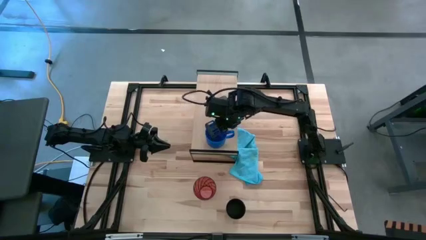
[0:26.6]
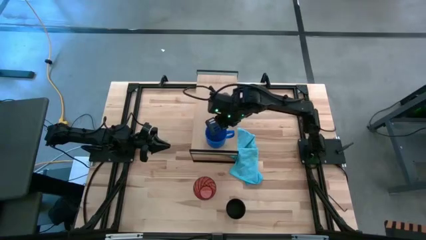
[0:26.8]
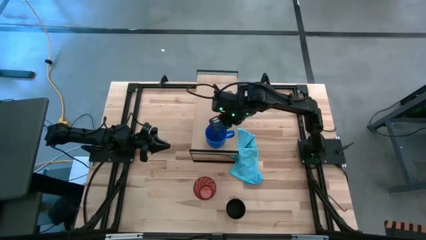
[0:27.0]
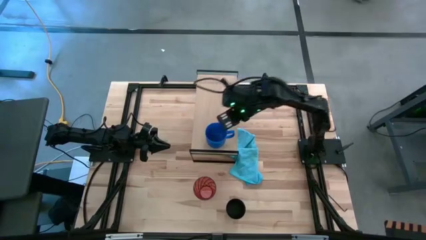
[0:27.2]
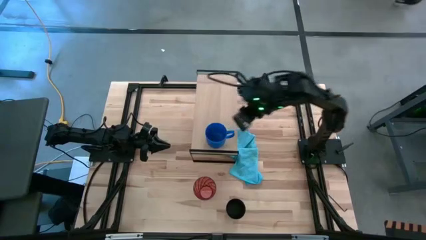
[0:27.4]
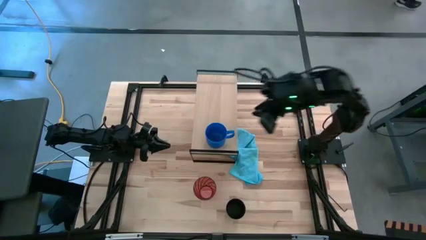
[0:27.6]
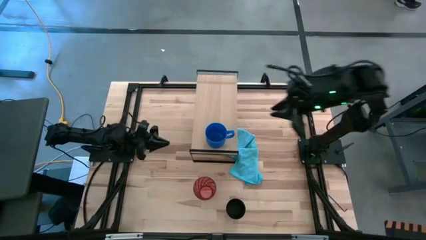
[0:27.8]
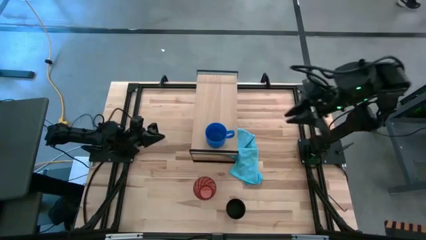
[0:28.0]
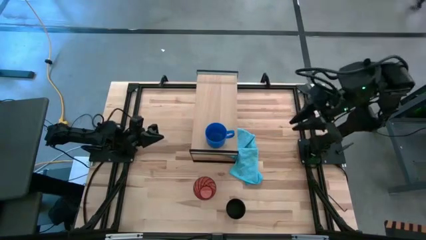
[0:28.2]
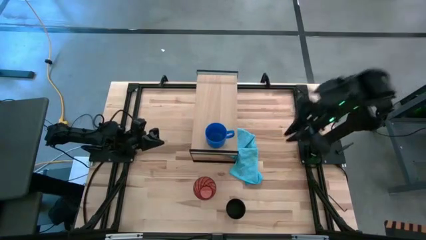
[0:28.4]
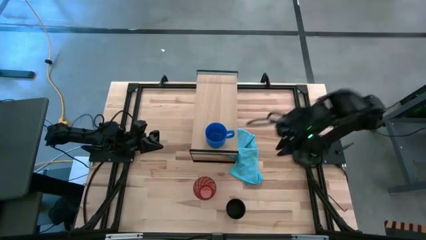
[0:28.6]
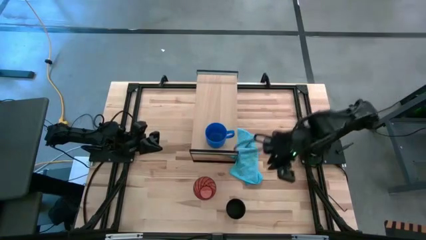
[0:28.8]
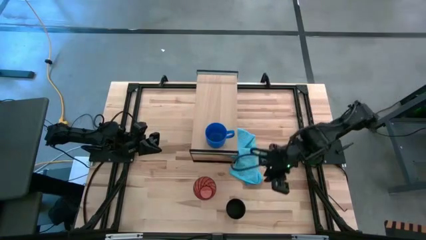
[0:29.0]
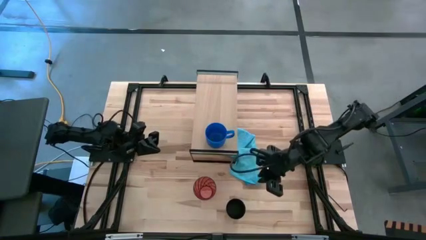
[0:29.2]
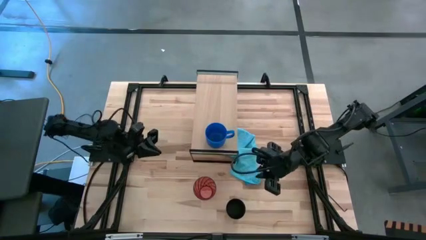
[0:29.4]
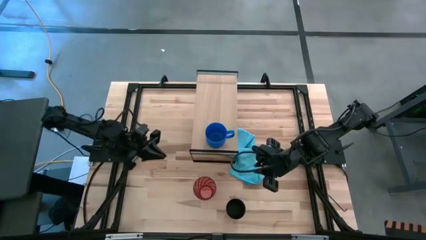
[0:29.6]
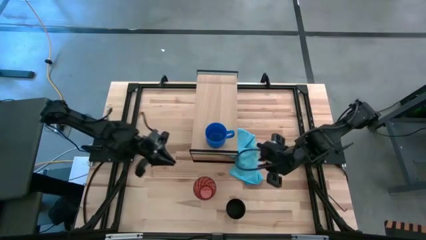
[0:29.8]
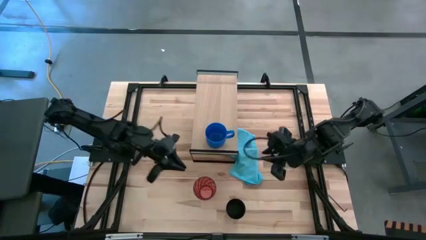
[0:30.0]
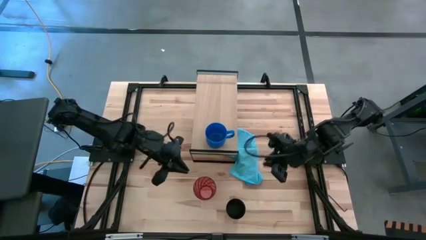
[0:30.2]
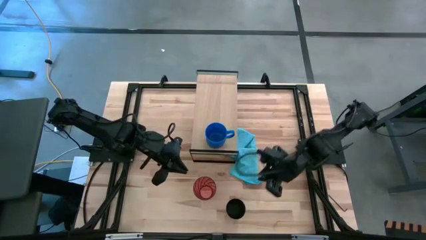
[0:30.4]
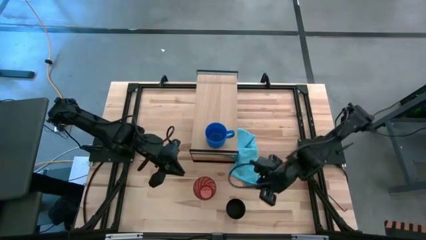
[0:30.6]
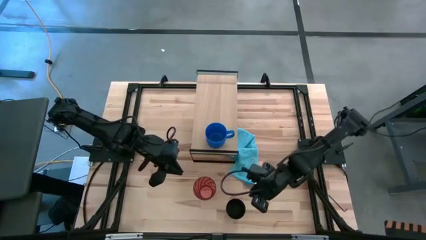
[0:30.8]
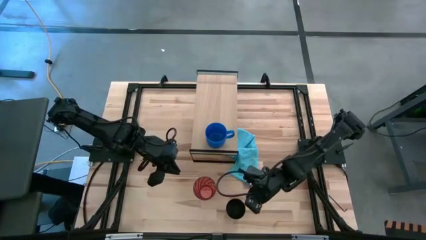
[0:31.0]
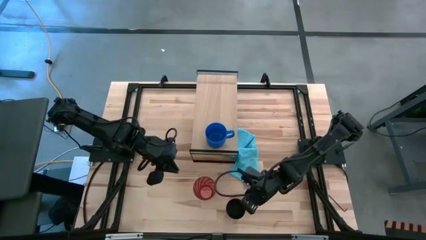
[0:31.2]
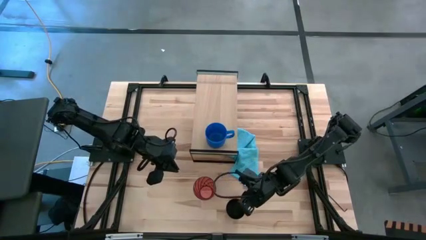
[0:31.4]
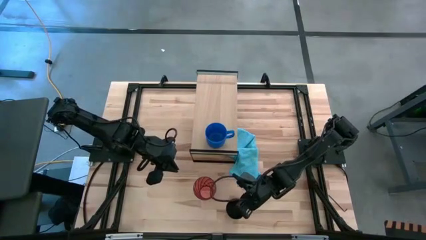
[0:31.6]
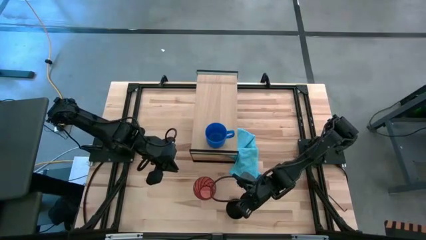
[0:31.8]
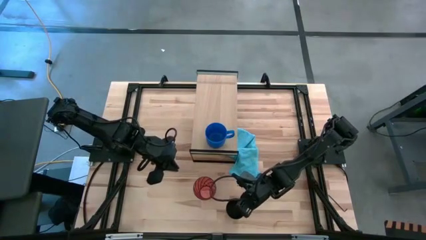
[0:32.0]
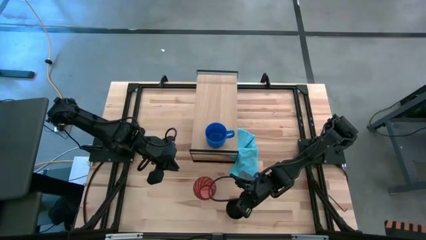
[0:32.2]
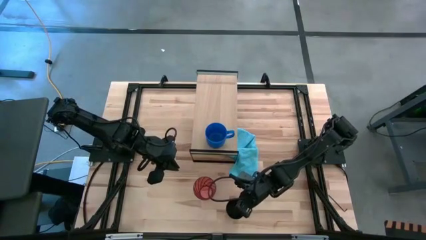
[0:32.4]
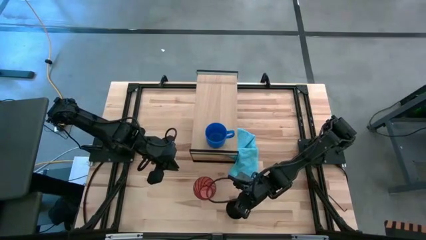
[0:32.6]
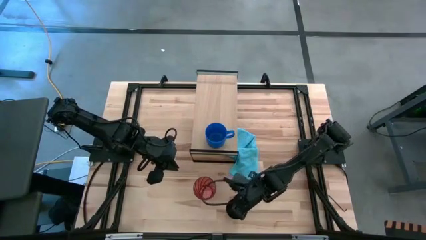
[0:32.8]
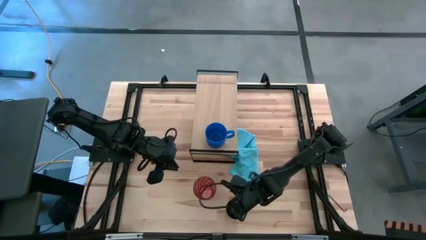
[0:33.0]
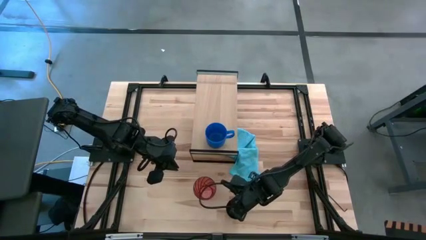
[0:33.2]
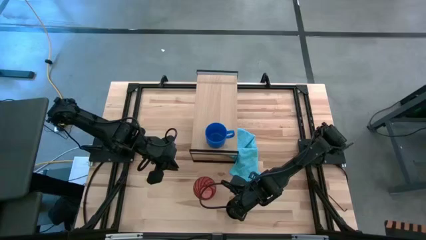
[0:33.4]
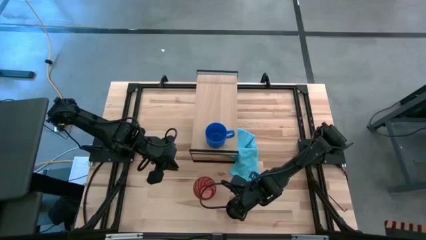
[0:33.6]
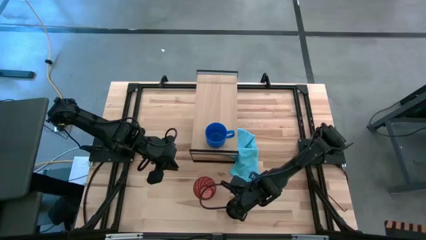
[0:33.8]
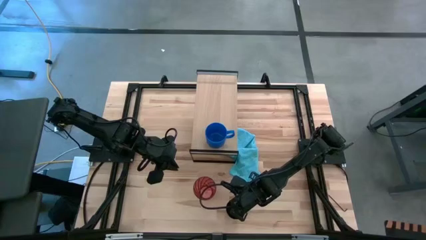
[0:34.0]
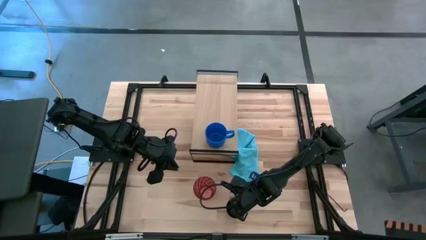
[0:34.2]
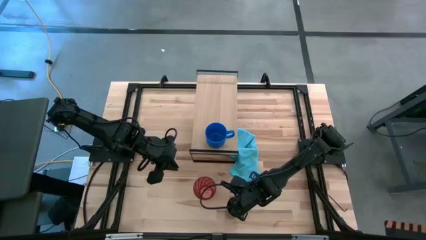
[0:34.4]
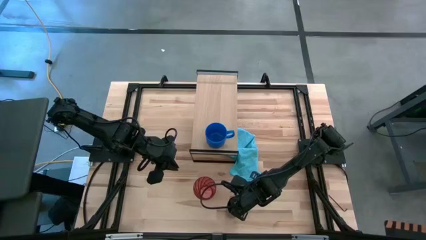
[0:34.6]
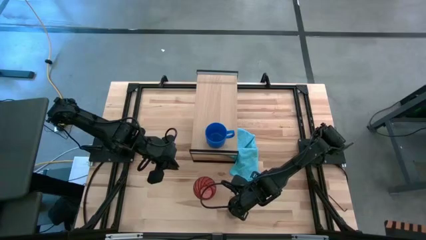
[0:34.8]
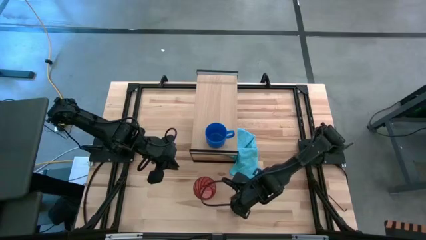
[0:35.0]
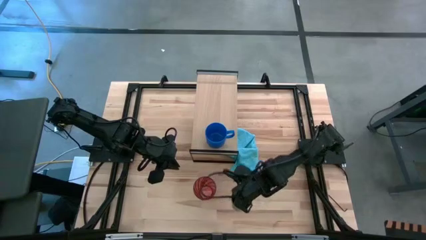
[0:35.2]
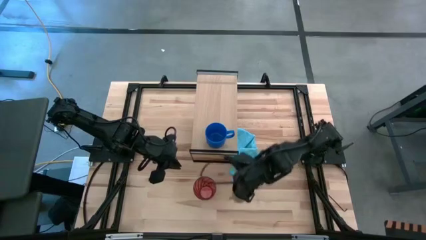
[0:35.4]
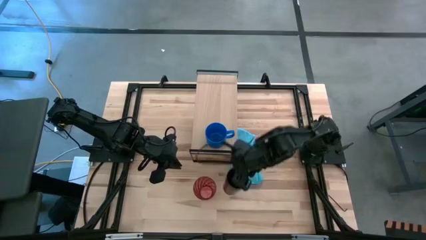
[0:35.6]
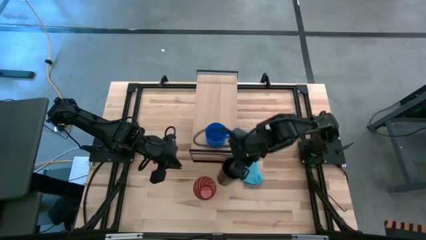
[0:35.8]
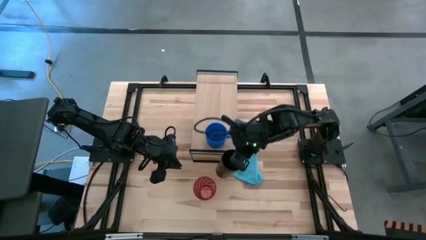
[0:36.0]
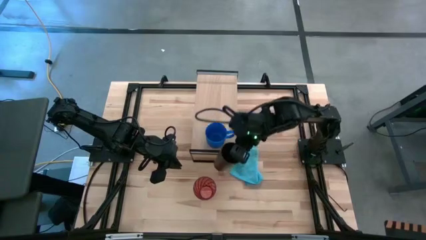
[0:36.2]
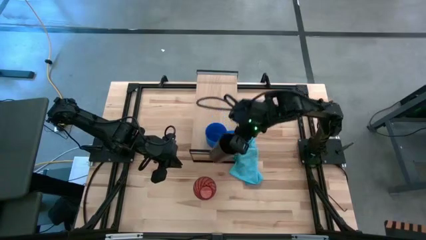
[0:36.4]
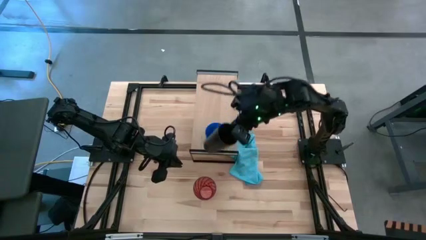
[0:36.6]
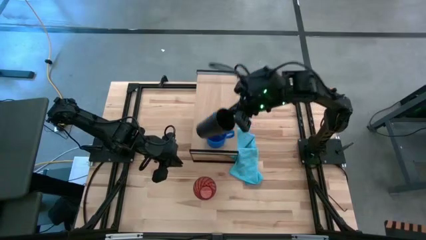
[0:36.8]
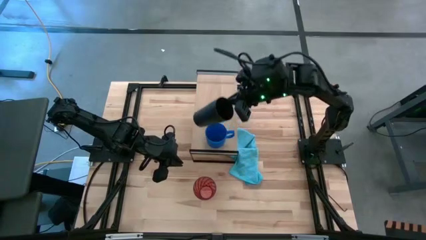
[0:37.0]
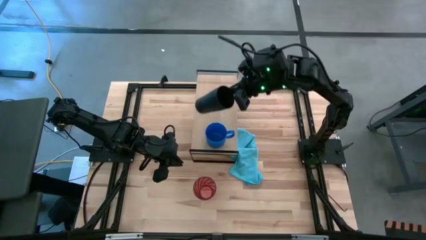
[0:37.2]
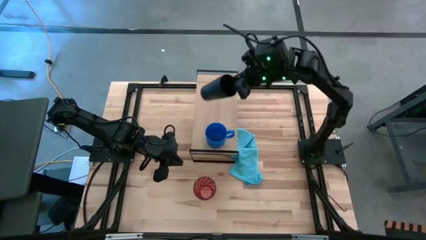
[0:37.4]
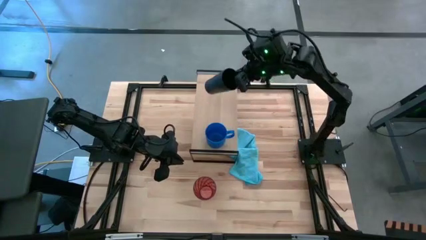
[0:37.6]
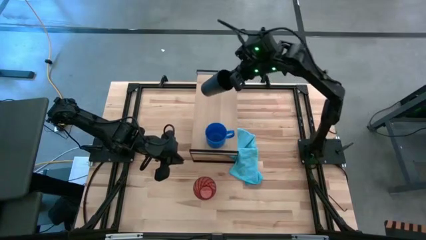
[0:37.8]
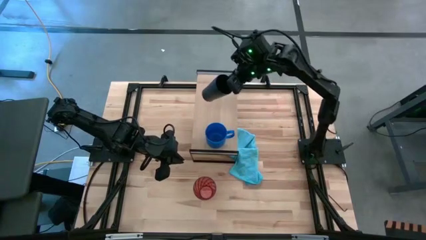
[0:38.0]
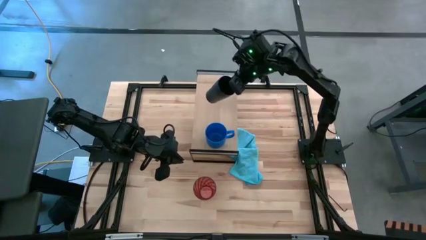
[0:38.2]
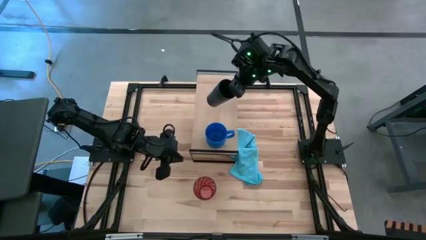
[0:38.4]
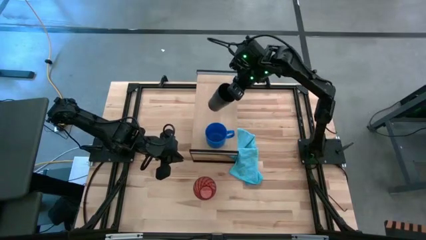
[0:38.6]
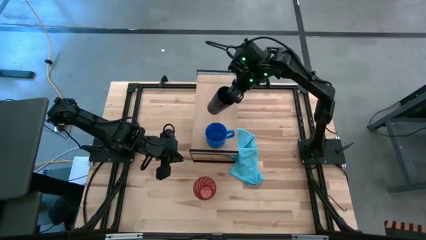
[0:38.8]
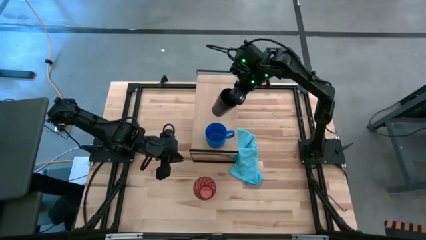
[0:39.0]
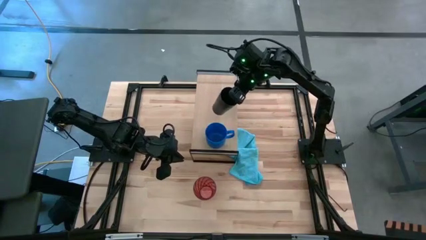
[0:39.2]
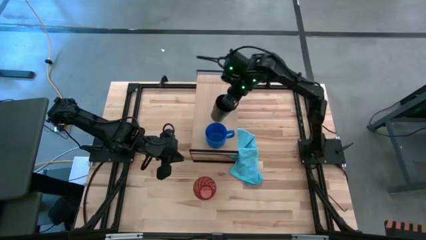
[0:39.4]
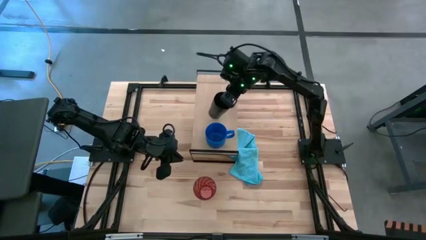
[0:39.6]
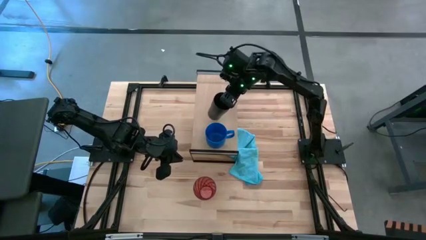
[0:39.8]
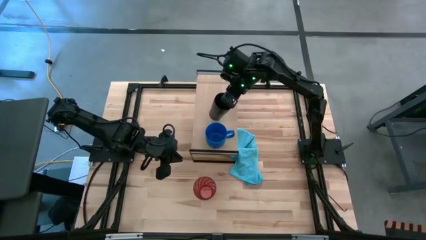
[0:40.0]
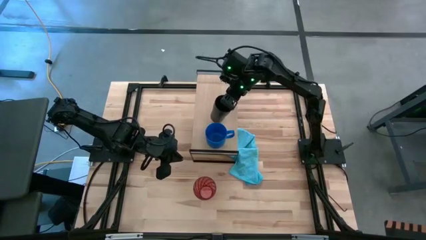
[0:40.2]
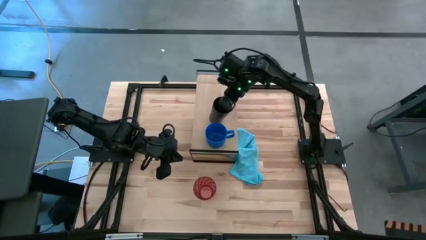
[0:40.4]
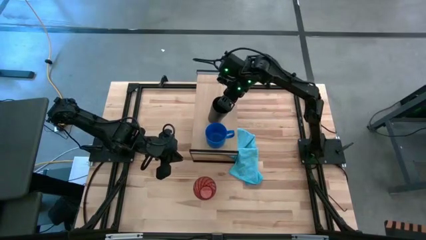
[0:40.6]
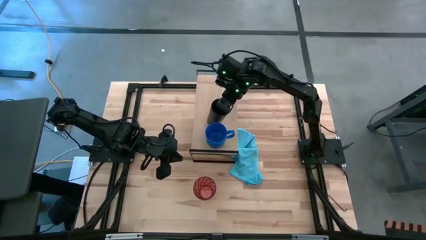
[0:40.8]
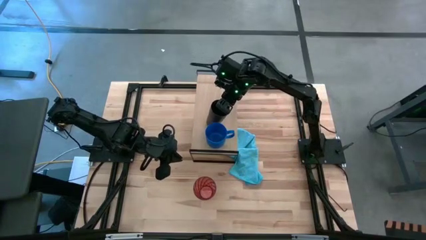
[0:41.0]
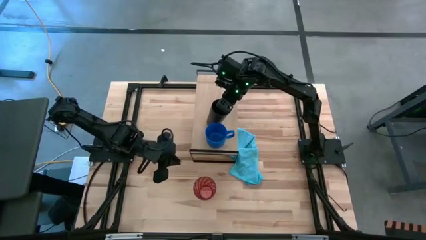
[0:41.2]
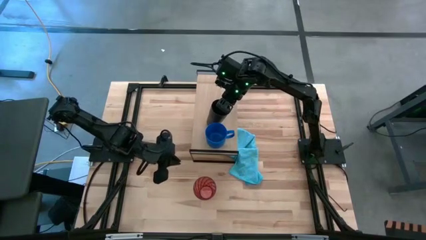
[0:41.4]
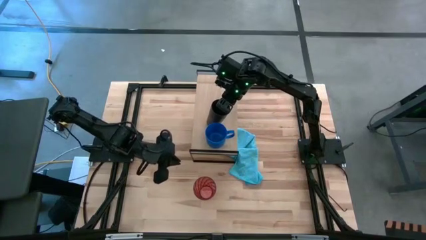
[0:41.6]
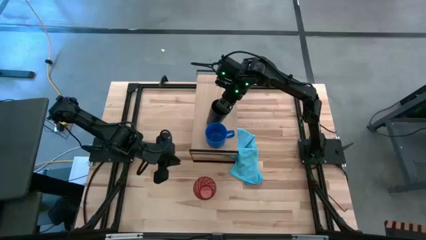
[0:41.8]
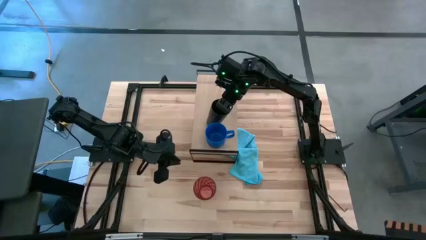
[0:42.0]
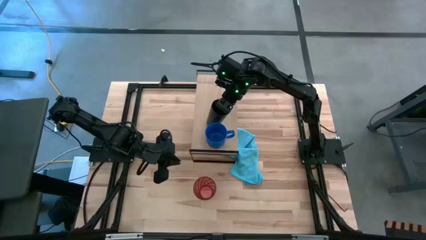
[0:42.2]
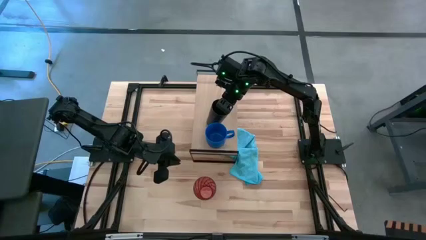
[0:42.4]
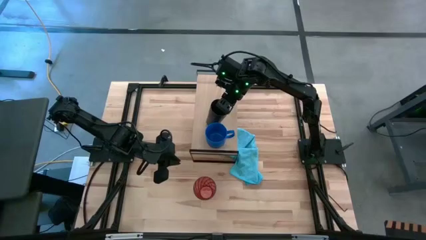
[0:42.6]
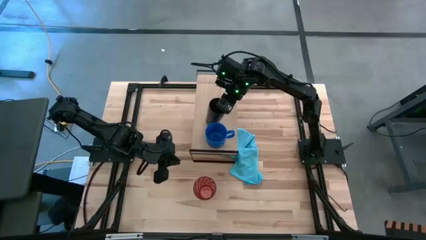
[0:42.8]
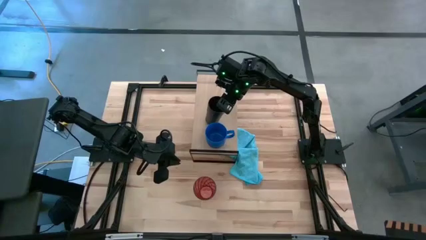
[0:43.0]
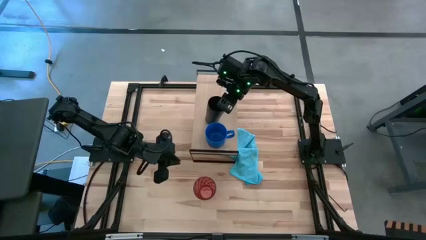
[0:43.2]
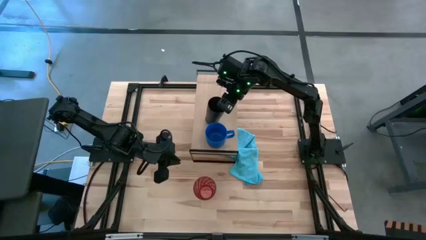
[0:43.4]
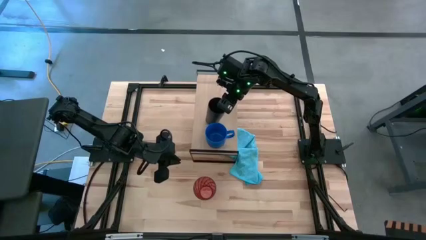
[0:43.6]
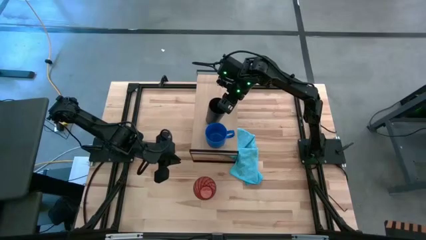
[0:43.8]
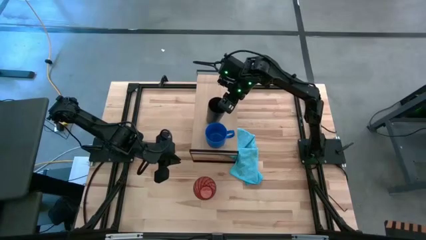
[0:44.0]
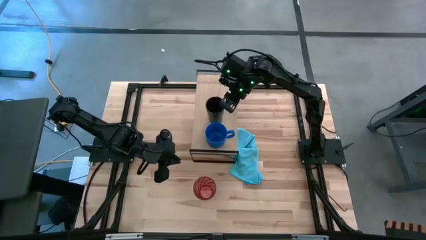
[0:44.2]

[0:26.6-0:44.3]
Task: Stack small to large cups/mugs on shelf
Put the black cup on the shelf
